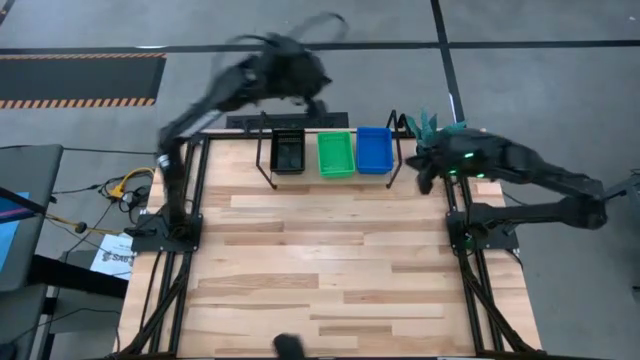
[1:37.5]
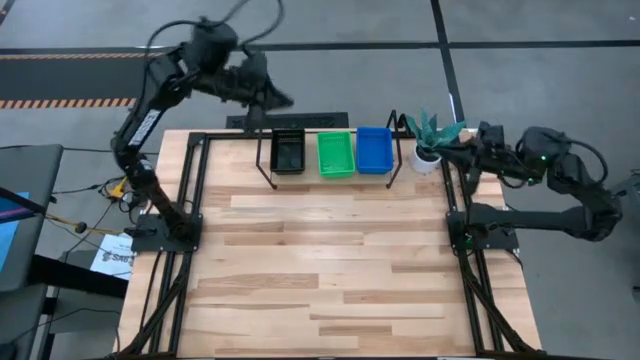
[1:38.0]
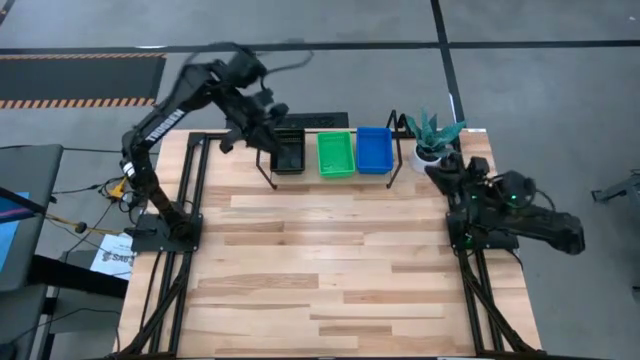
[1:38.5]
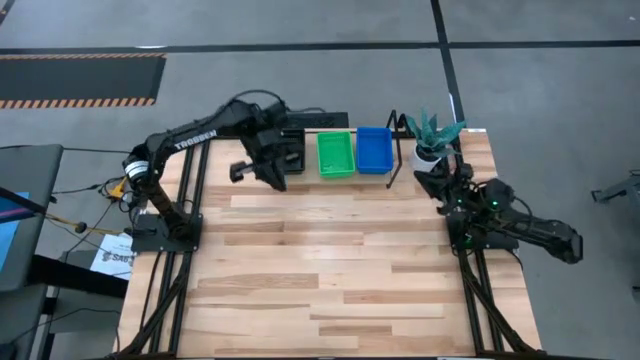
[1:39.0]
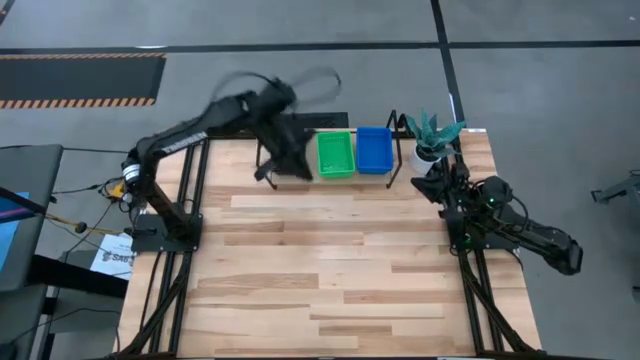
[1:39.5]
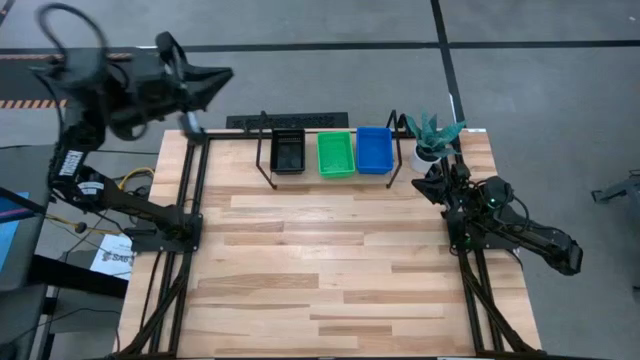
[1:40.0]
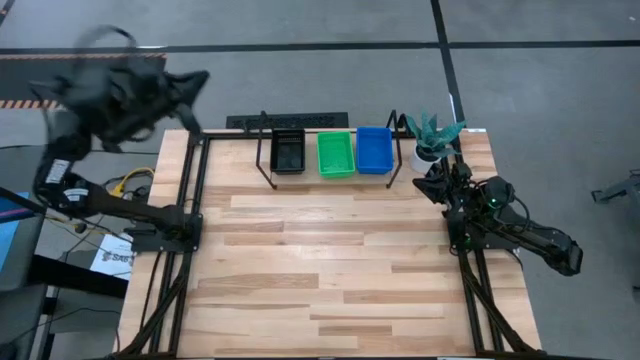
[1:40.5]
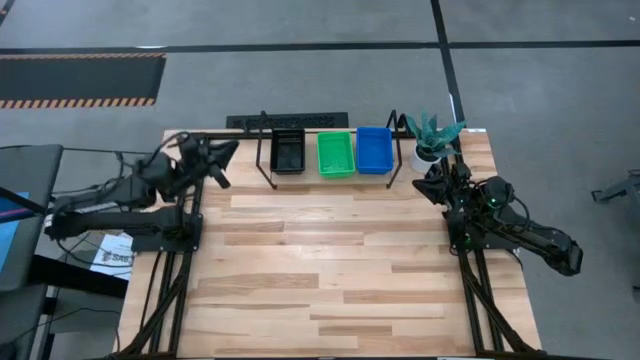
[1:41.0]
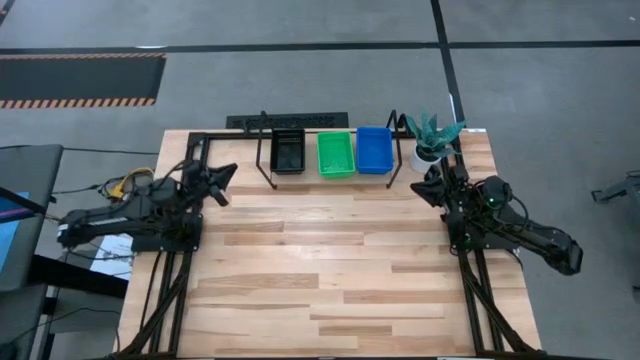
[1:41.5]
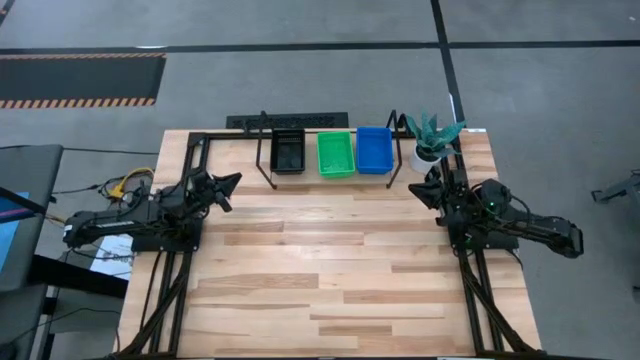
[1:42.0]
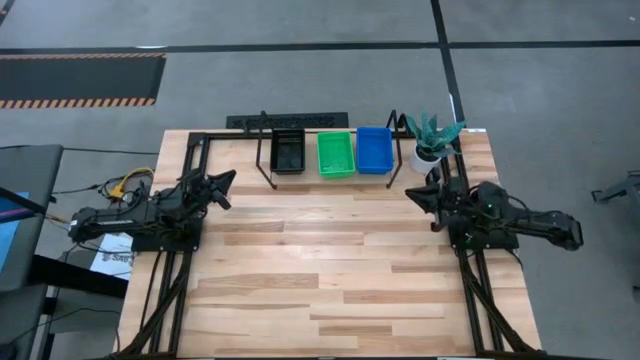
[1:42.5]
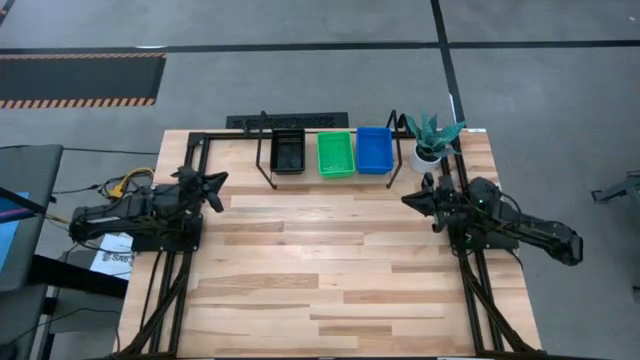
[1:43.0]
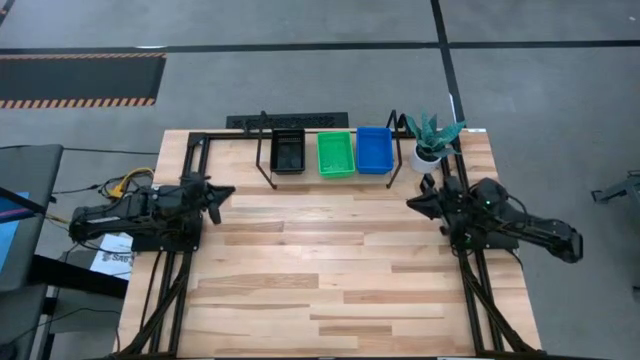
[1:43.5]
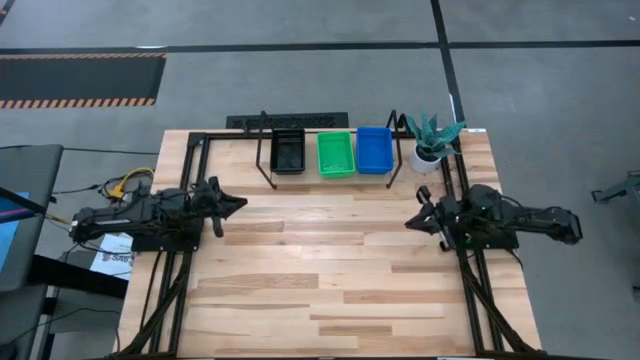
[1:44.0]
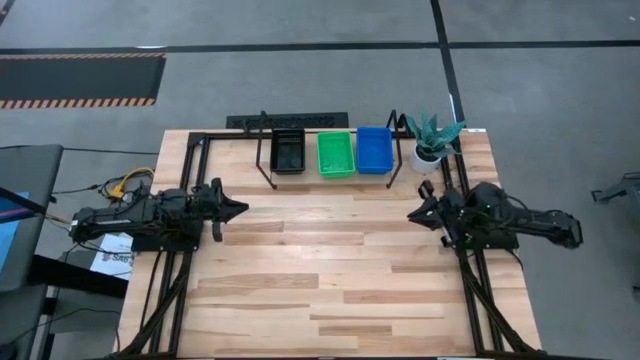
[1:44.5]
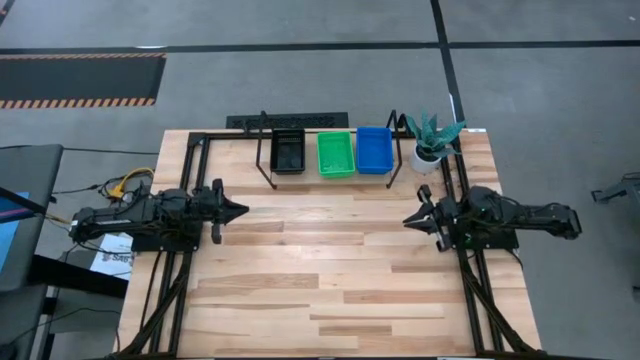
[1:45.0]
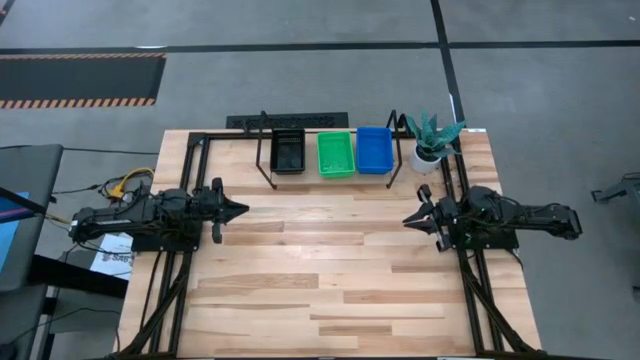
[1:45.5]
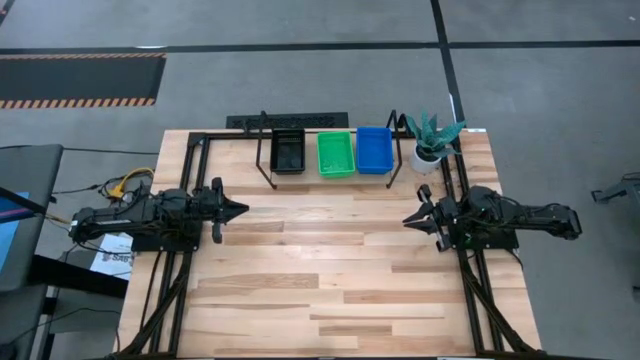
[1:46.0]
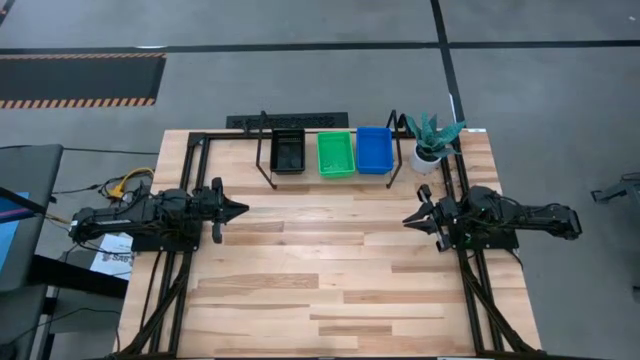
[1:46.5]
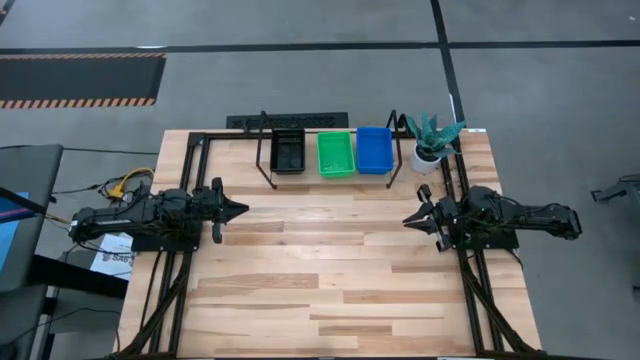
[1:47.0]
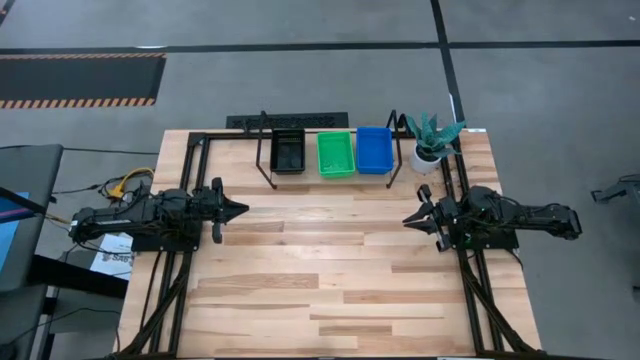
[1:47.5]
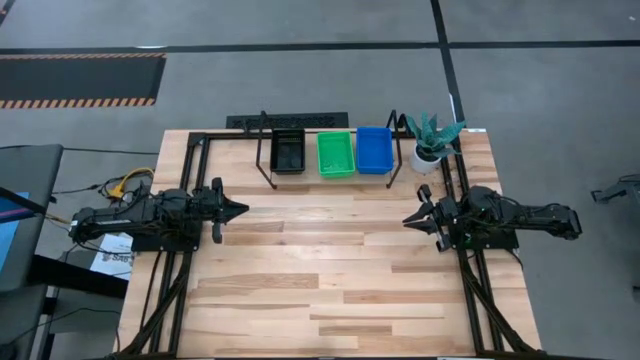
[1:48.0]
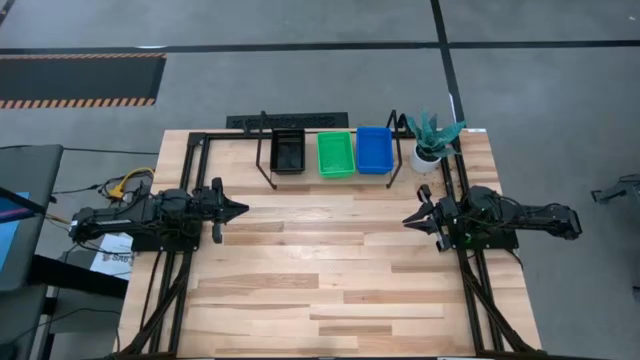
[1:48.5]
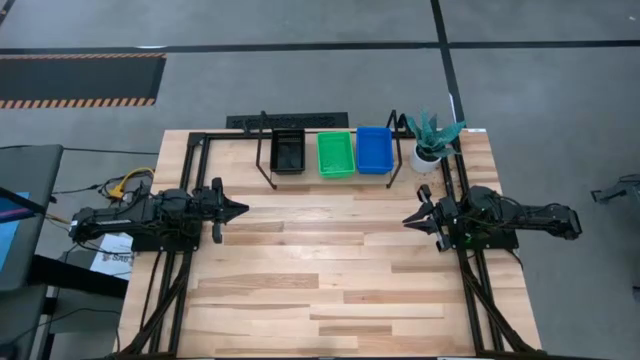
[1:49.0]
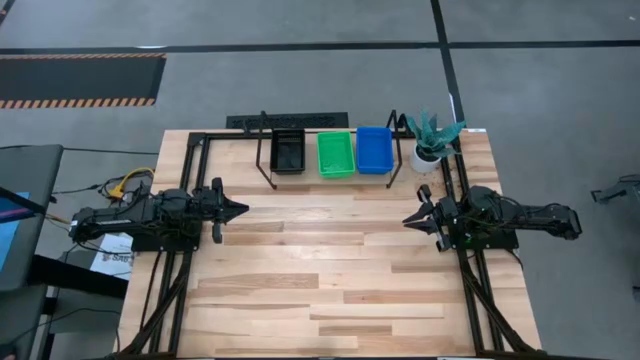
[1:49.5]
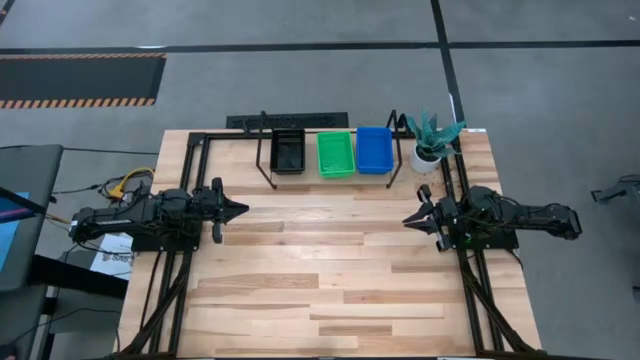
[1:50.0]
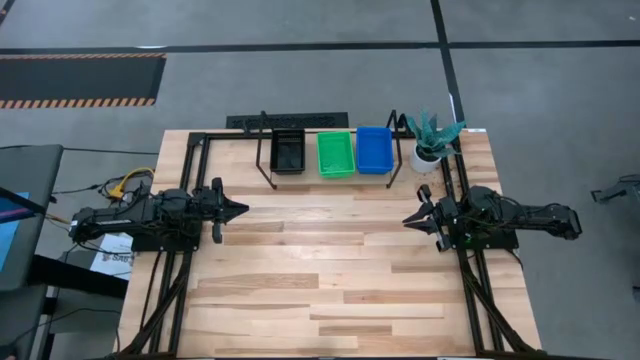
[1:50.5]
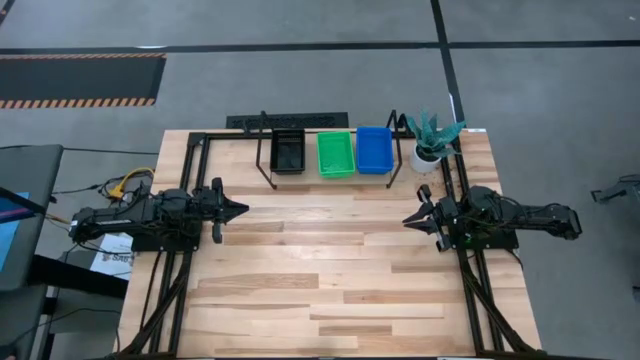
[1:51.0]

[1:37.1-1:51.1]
Task: Stack baskets on shelf by color
Return to Home Position

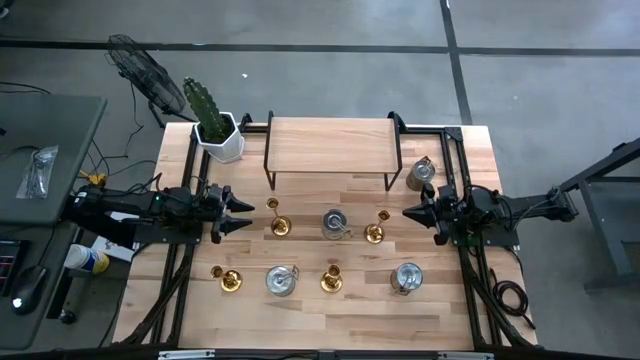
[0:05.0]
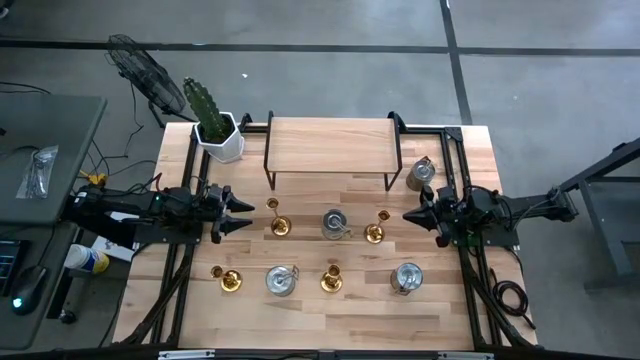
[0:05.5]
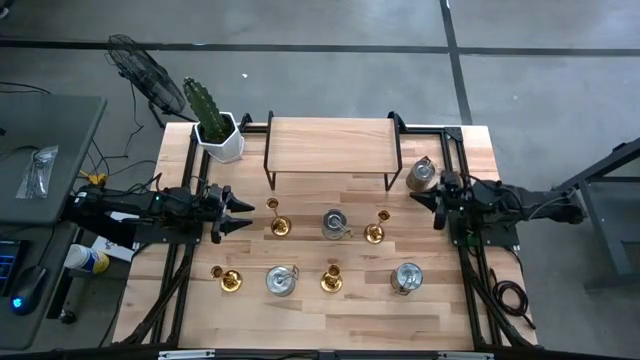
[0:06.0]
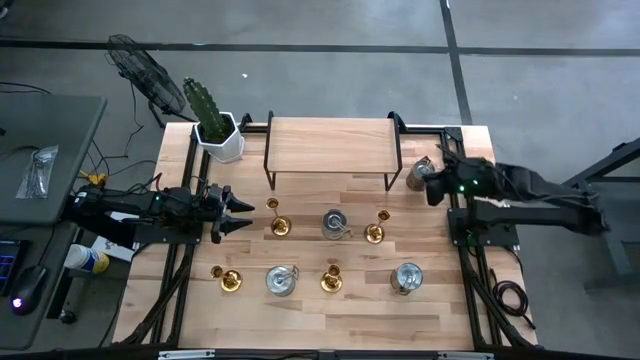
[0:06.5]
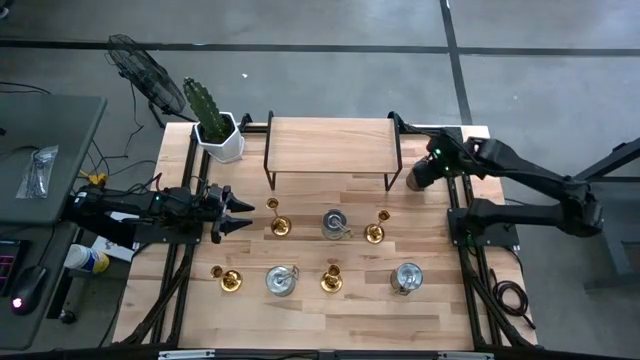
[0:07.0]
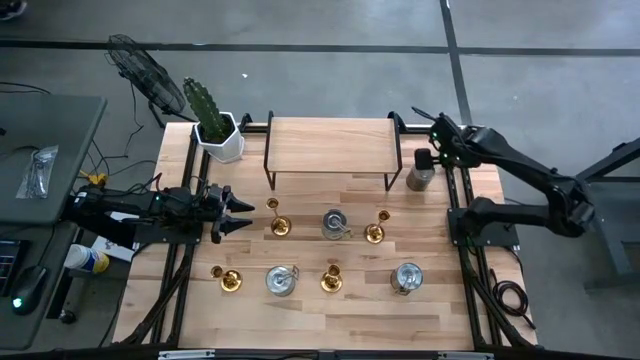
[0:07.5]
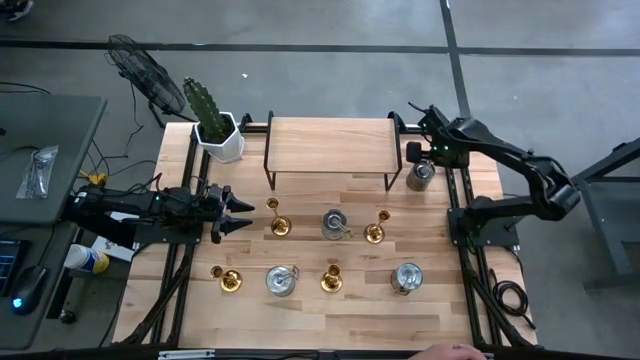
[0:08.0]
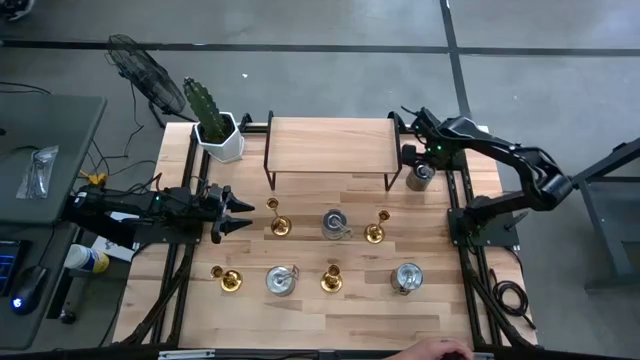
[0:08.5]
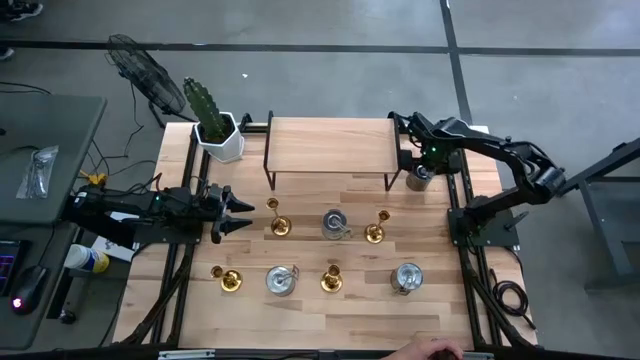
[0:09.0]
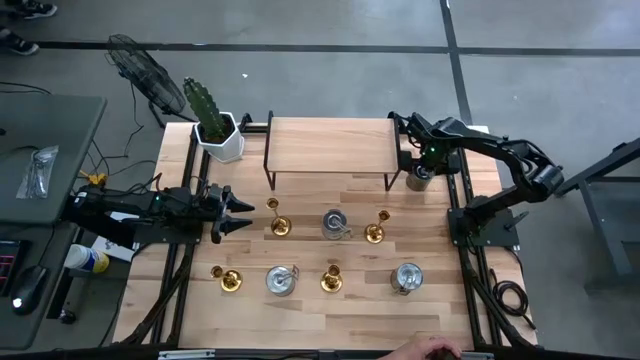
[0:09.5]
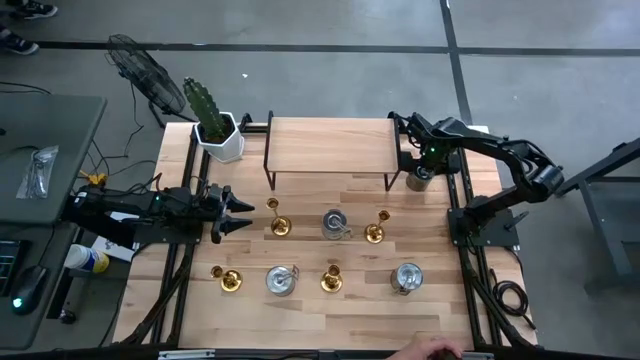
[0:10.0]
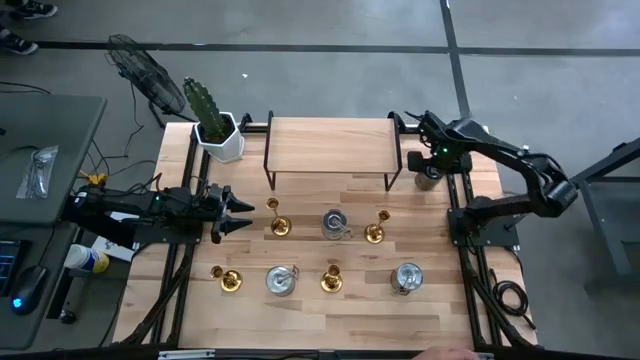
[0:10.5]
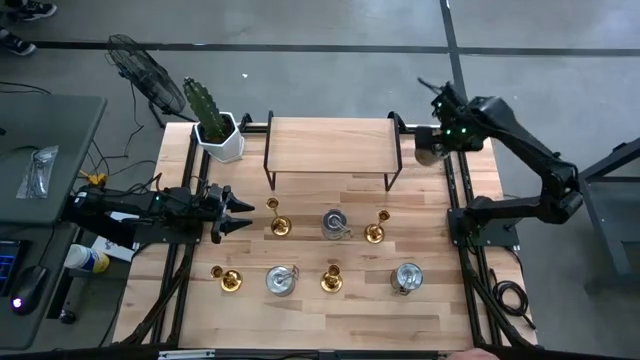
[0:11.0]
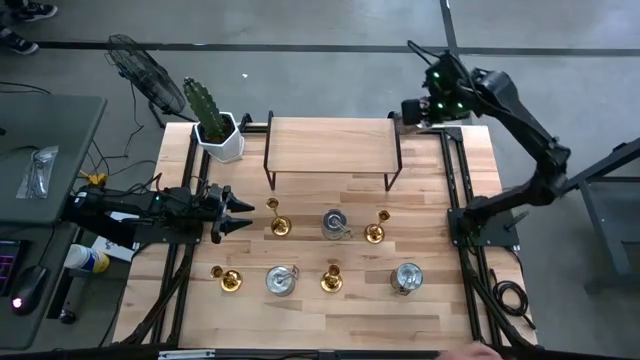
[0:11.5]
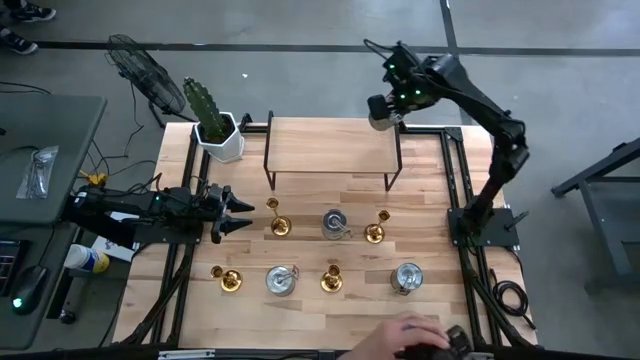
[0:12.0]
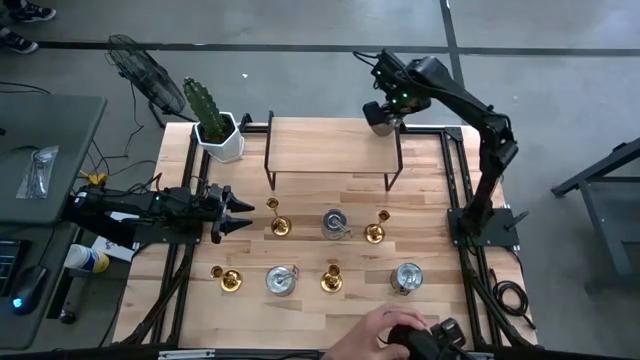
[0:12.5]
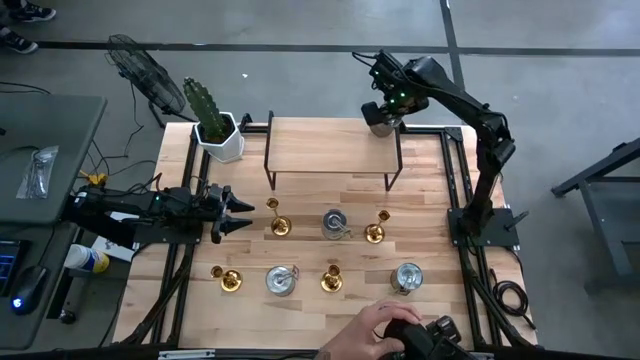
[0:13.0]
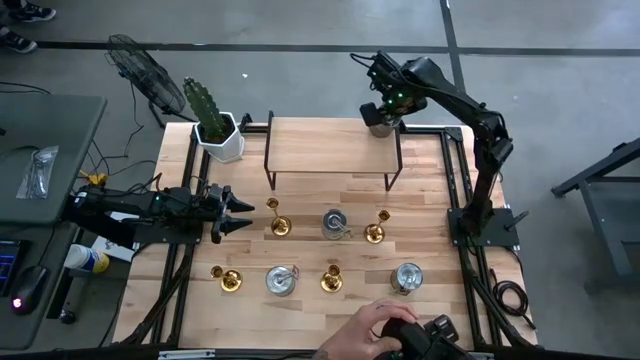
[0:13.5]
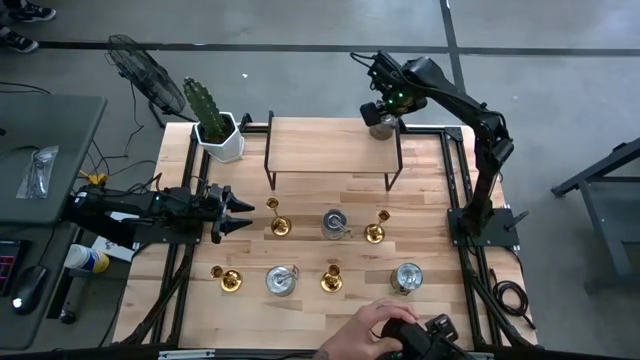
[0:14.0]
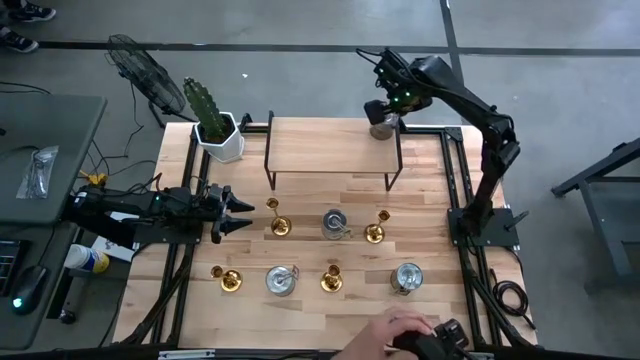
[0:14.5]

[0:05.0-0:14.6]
Task: Pick & Place candle stick holders
Put the silver scented candle on the shelf
